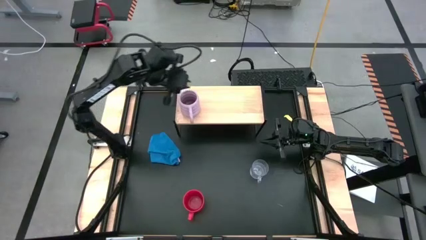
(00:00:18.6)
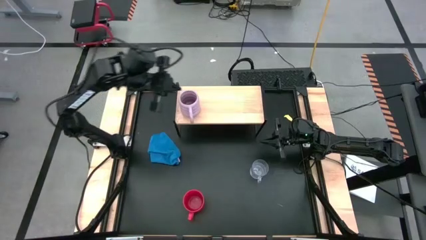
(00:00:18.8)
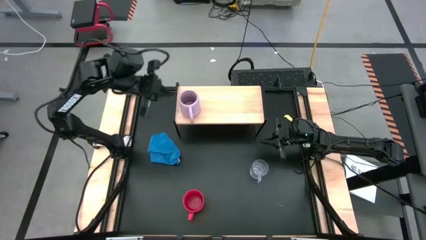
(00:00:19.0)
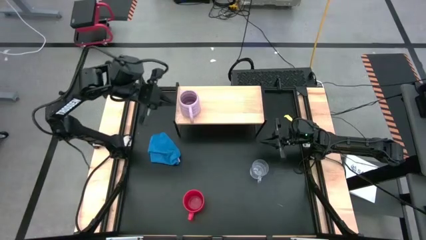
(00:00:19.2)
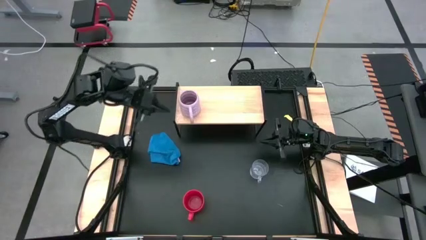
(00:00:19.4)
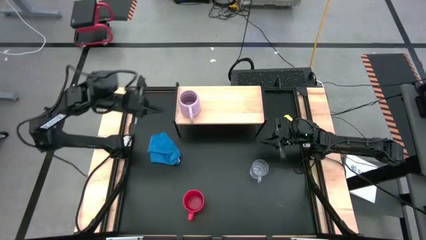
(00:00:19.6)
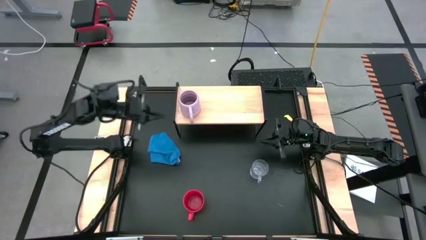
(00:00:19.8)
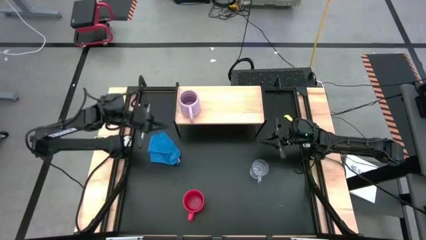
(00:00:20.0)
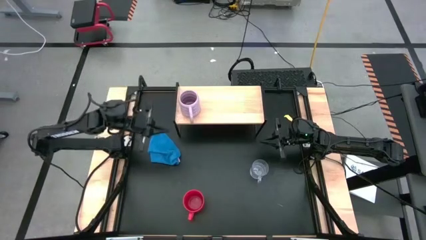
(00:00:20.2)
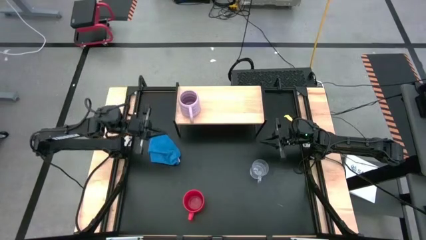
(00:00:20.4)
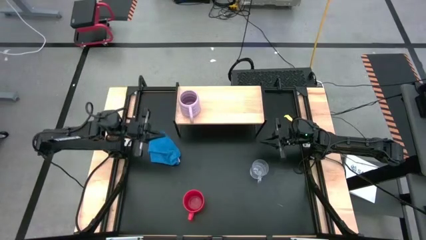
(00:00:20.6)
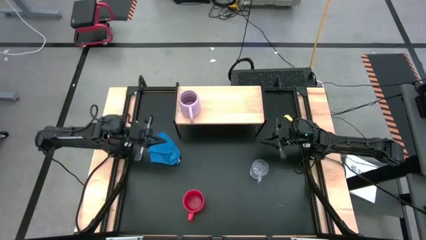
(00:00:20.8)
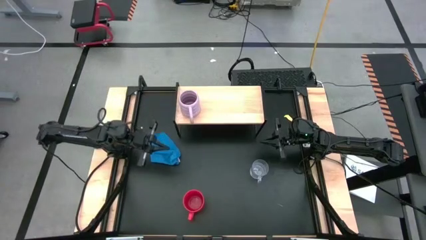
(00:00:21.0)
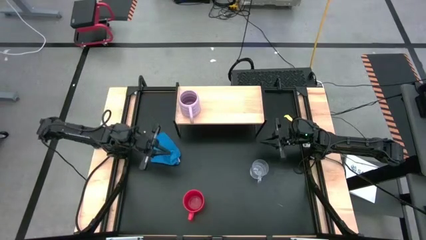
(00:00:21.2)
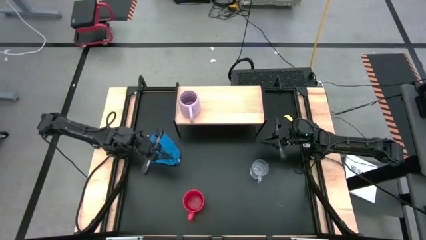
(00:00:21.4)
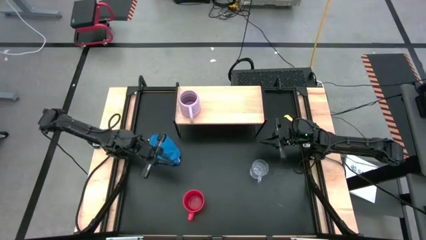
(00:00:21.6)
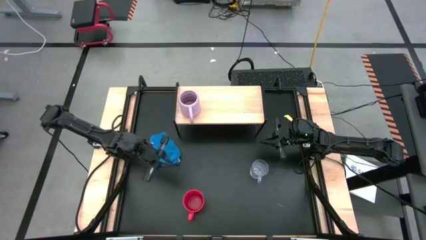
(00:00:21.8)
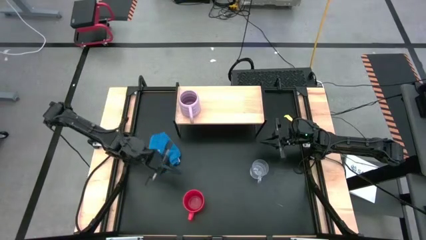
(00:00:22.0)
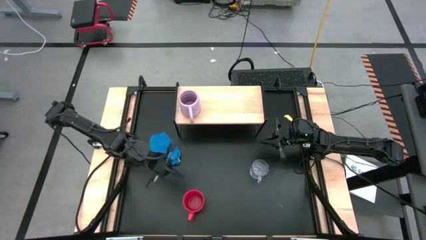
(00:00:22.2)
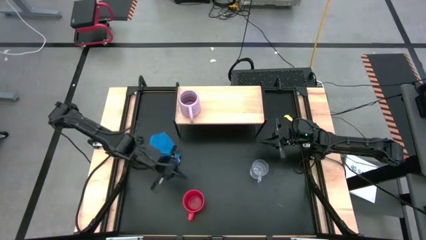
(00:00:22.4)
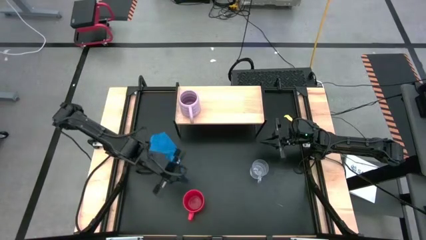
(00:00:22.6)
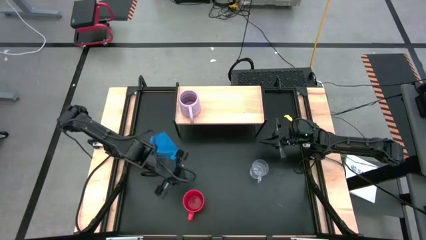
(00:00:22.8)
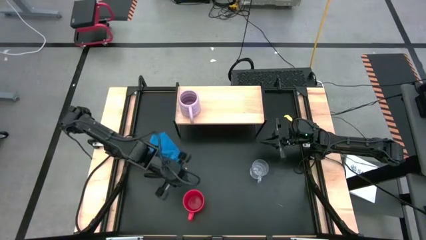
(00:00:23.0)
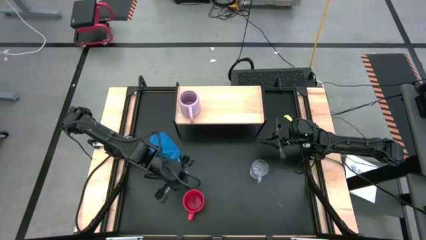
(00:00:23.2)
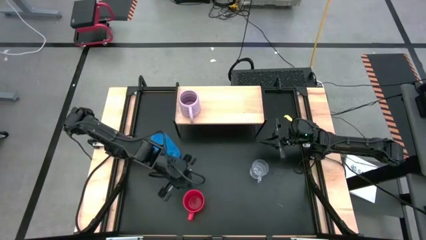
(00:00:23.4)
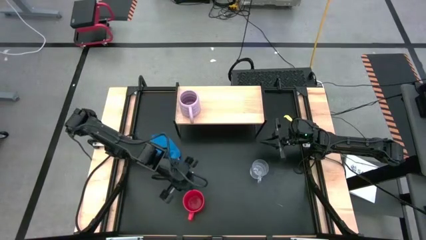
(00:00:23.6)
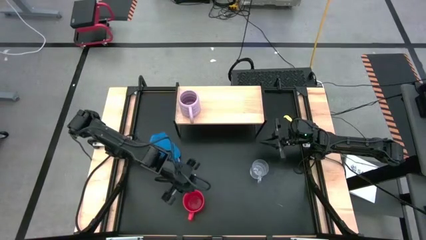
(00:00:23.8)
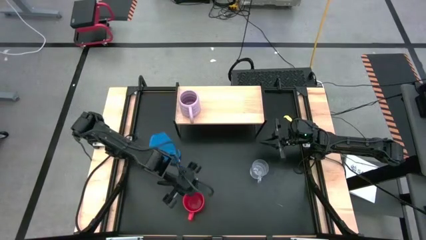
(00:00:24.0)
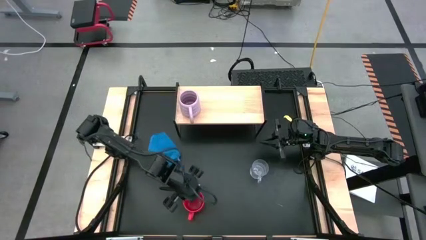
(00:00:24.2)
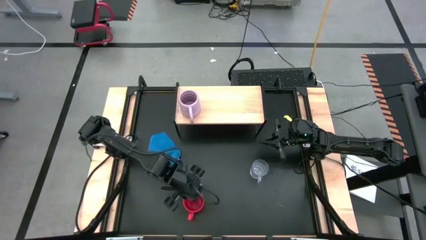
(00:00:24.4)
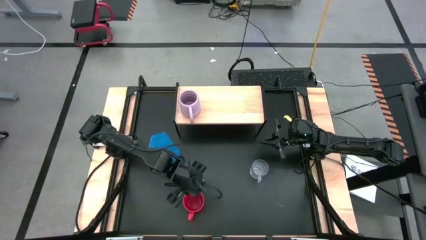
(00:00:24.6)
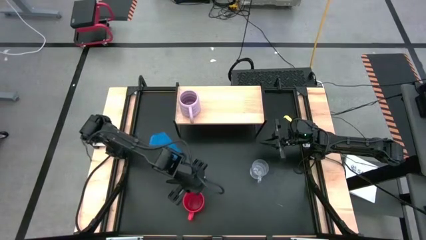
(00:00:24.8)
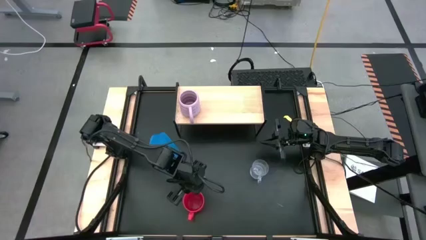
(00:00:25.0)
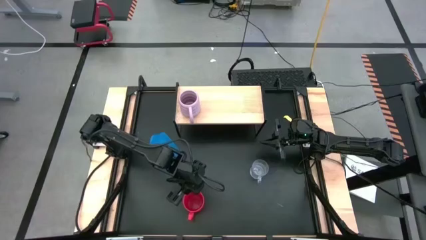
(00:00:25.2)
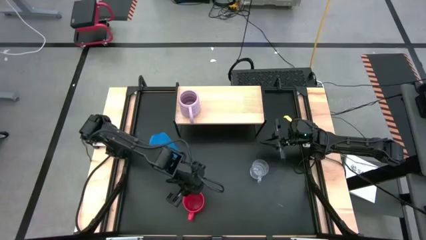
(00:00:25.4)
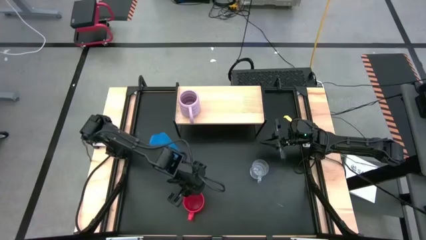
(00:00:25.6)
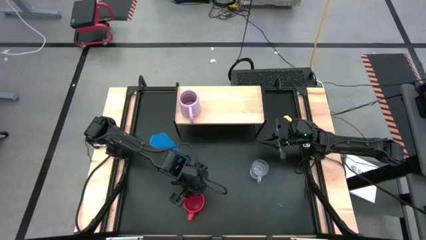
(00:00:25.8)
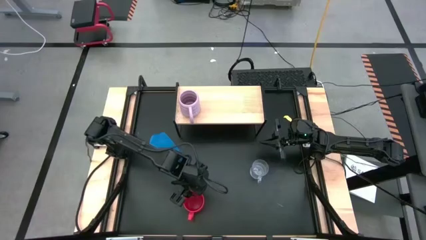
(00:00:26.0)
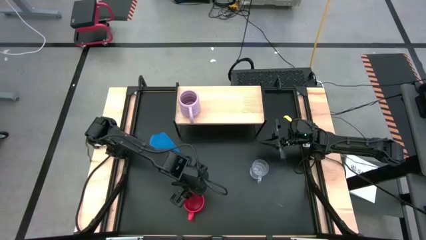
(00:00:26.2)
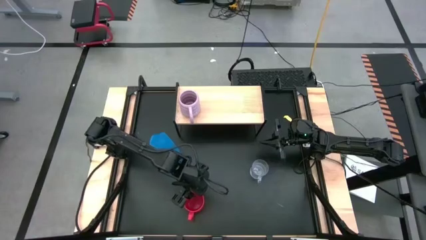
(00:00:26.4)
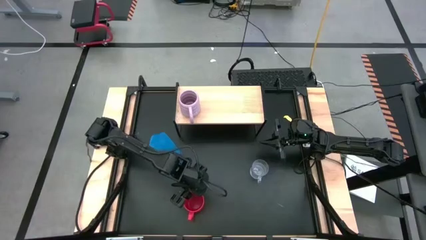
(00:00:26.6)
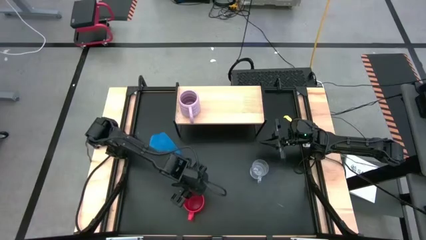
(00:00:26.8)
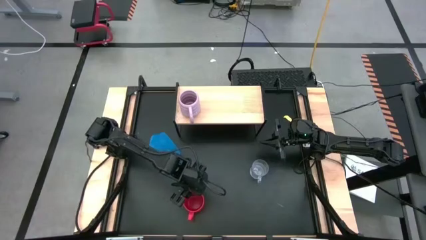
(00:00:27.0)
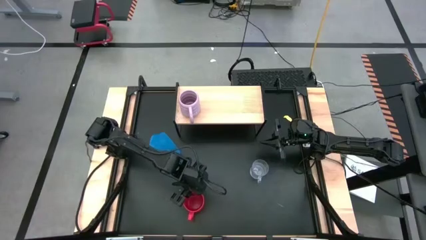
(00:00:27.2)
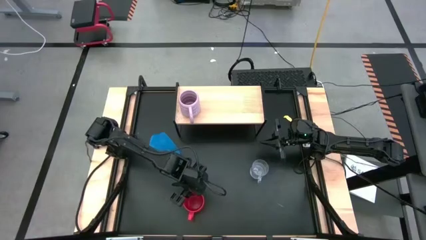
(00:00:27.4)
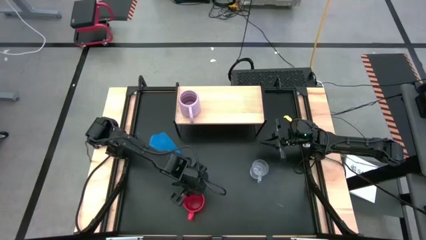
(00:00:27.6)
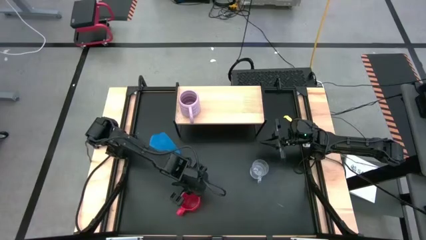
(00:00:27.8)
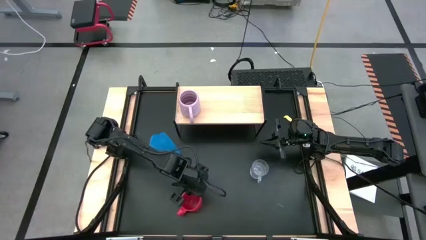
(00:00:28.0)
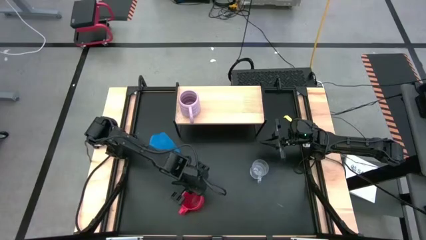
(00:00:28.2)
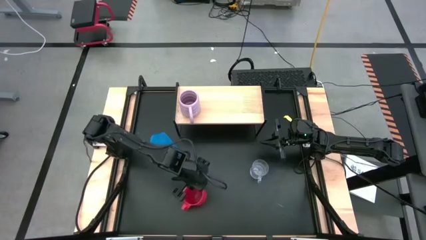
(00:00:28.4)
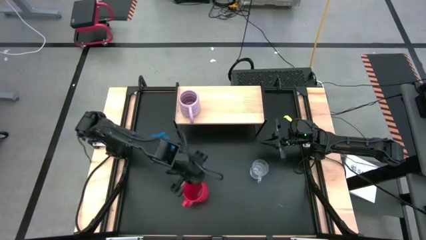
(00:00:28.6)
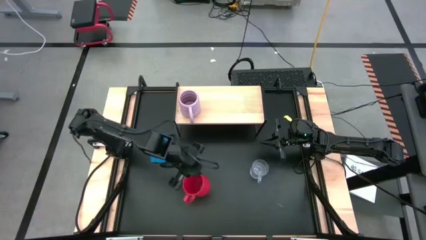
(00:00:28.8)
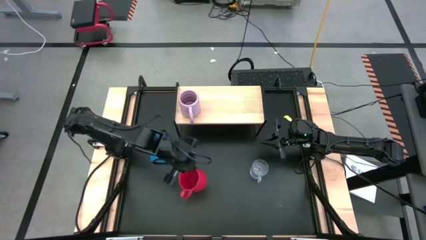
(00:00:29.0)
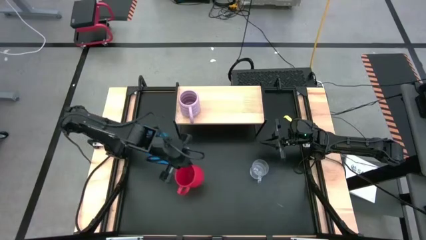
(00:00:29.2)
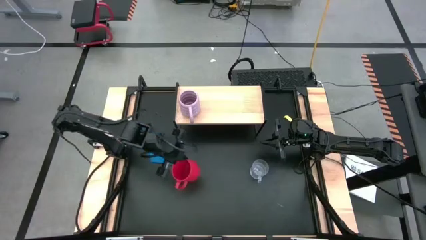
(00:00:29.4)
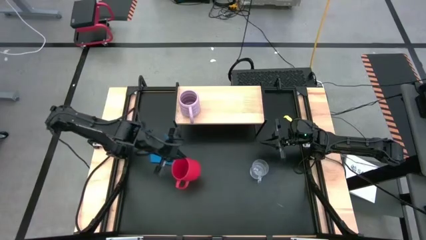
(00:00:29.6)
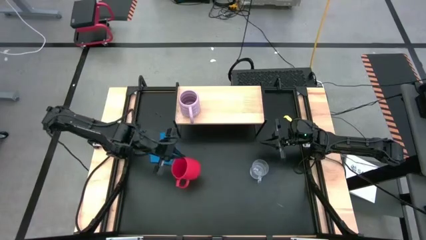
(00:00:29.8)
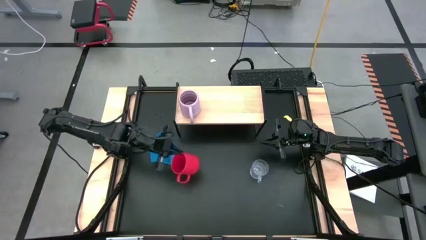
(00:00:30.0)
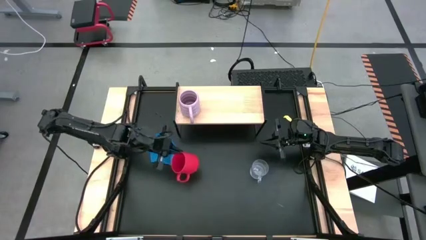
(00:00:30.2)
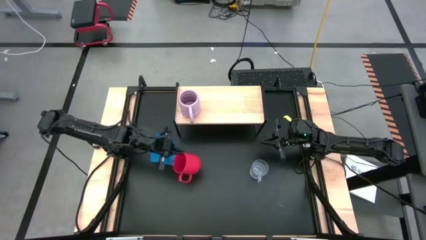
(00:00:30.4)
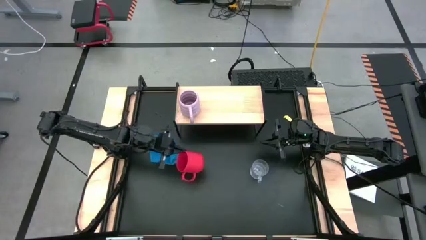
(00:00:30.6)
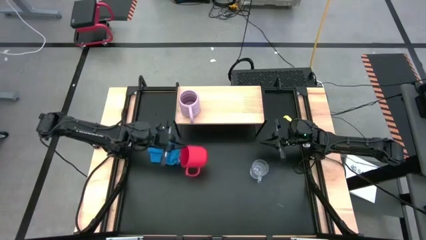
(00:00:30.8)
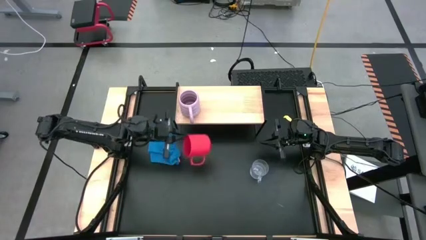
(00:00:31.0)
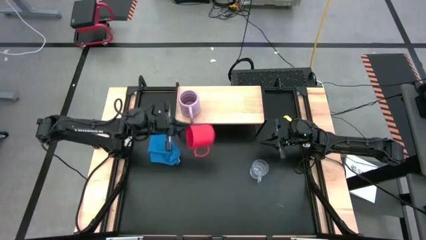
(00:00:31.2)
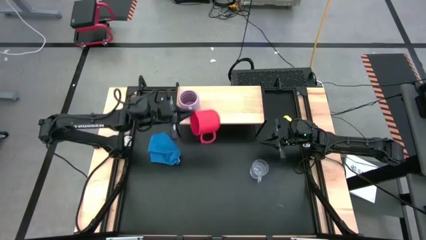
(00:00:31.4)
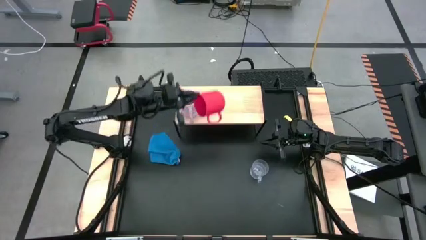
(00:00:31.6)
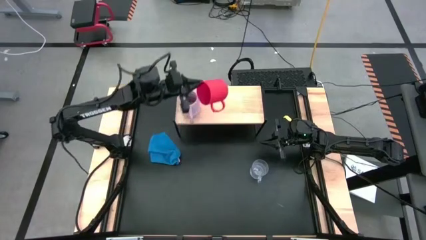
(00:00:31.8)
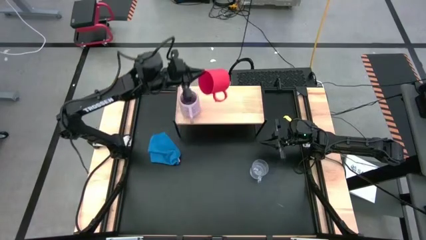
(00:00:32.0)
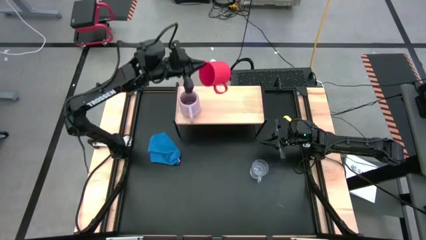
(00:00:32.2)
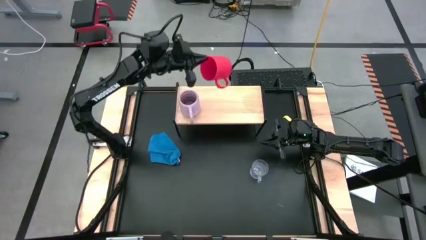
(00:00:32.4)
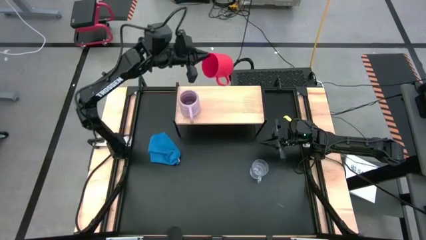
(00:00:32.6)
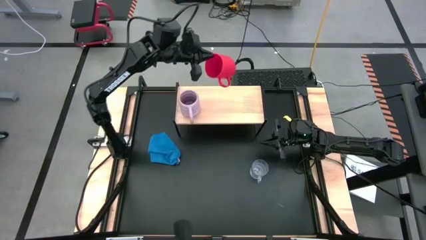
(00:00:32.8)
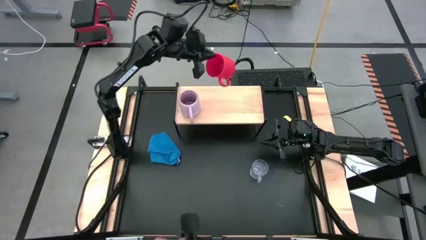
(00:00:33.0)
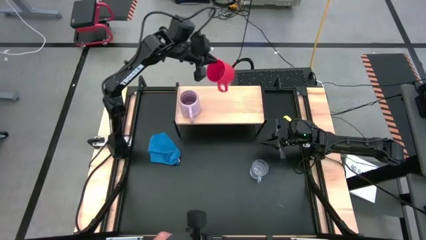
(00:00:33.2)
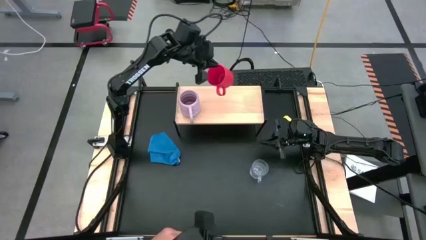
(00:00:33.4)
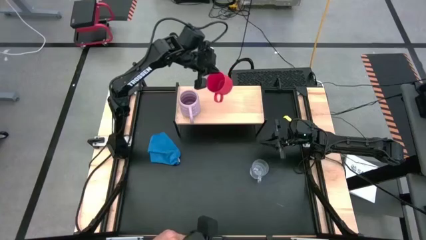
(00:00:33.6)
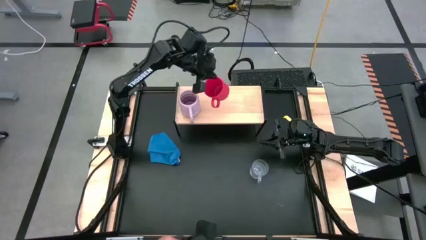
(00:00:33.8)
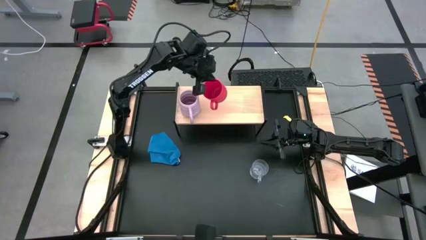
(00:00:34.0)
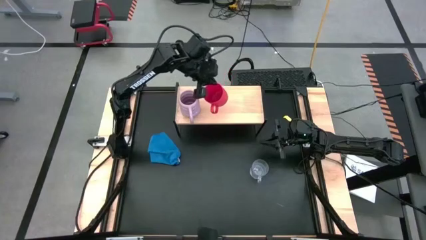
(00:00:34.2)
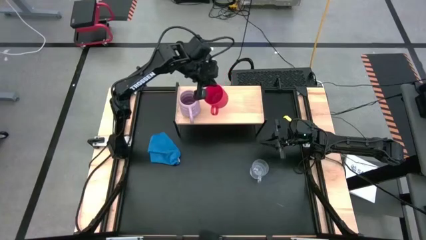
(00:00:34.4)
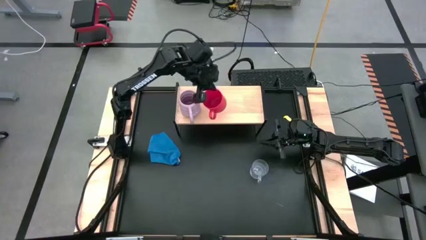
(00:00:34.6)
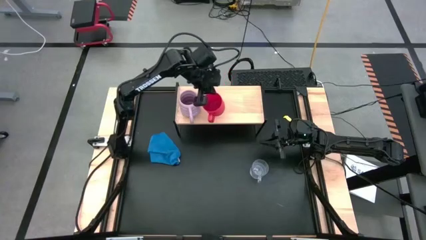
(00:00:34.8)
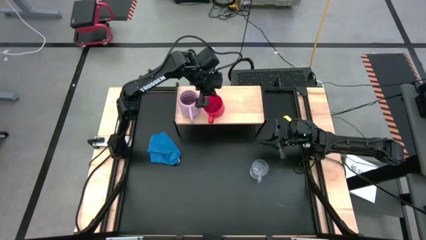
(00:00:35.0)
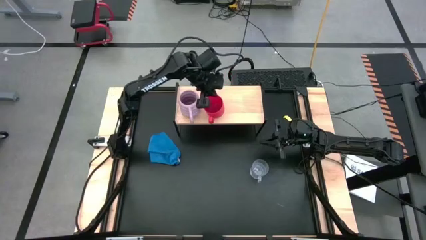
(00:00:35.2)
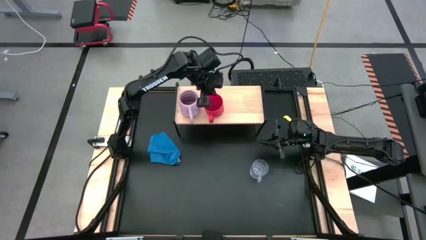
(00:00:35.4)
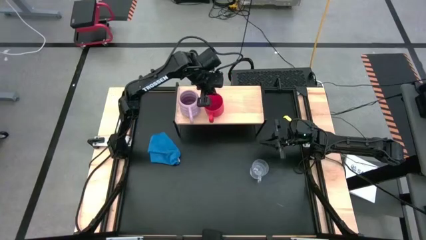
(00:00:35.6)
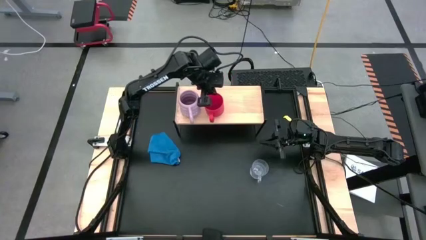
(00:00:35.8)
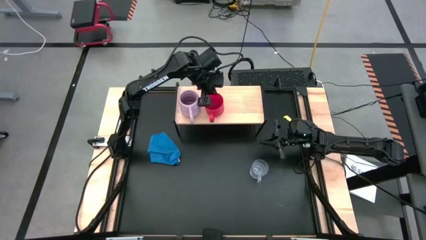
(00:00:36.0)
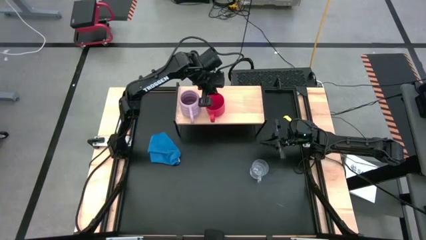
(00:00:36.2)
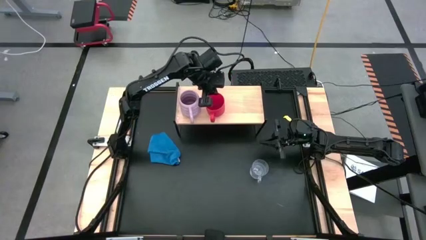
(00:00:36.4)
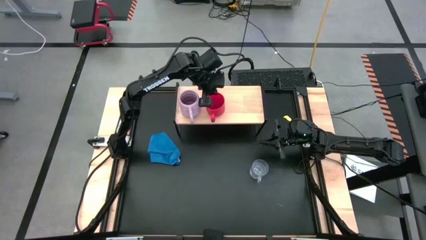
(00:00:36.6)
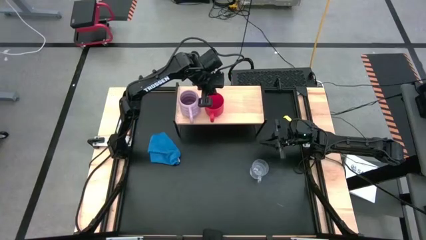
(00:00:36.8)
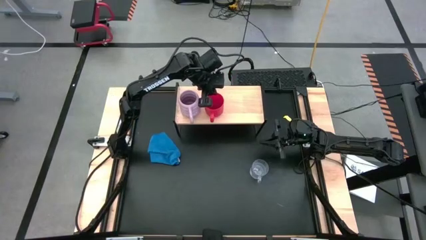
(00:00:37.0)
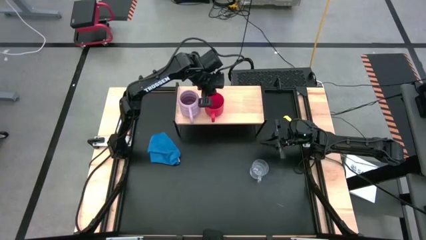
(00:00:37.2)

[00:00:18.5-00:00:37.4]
Task: Stack small to large cups/mugs on shelf
Put the red mug on the shelf
